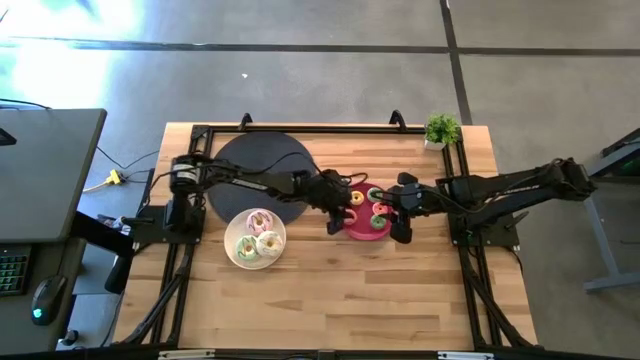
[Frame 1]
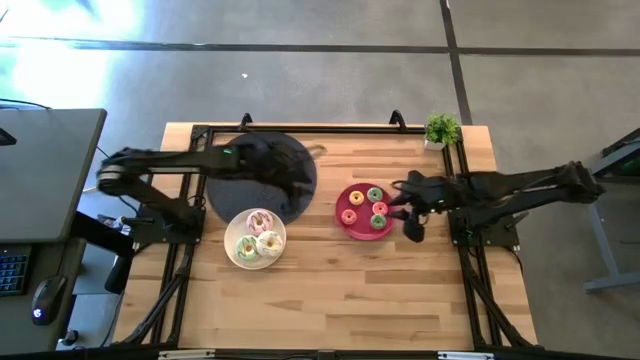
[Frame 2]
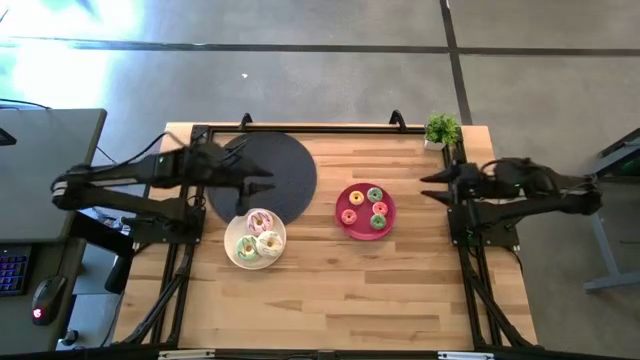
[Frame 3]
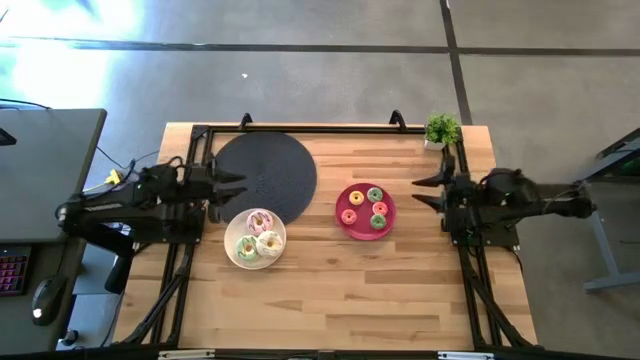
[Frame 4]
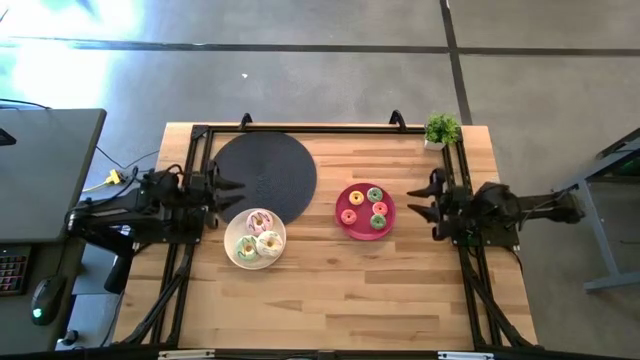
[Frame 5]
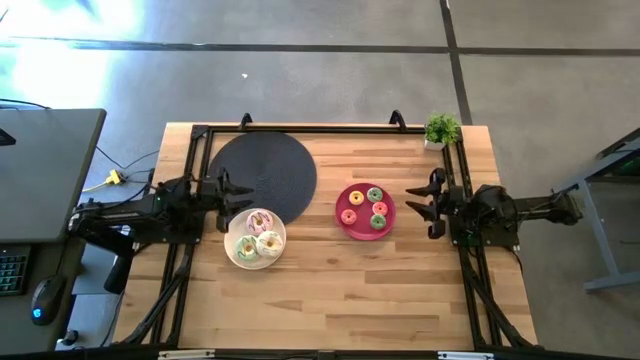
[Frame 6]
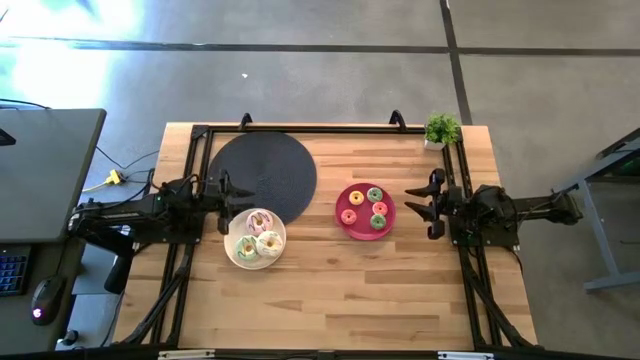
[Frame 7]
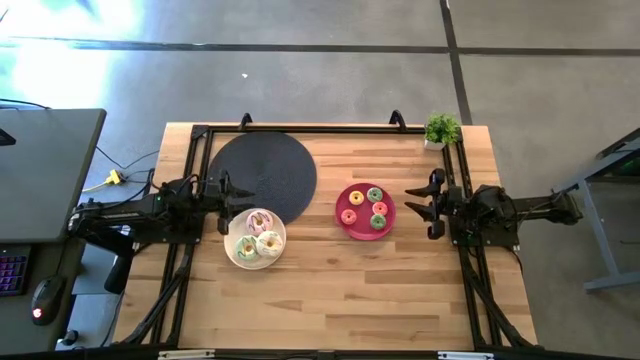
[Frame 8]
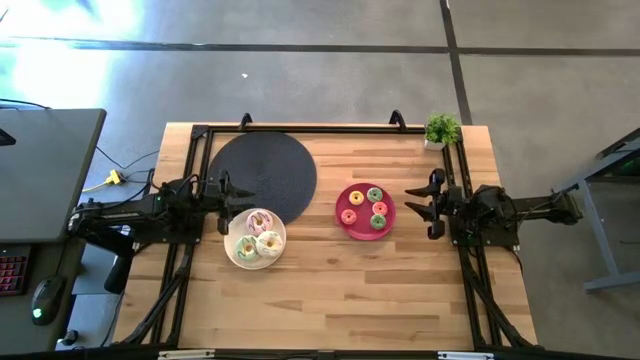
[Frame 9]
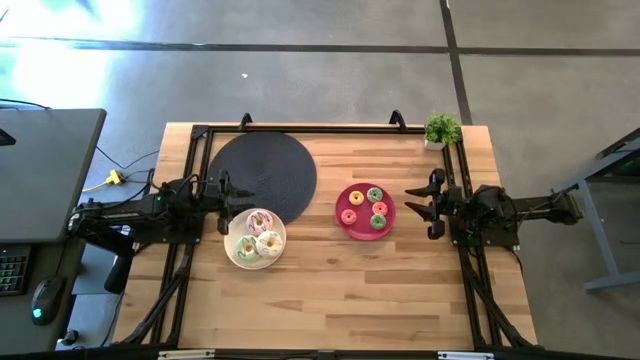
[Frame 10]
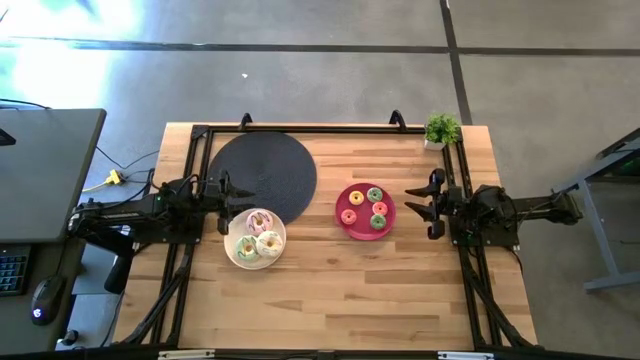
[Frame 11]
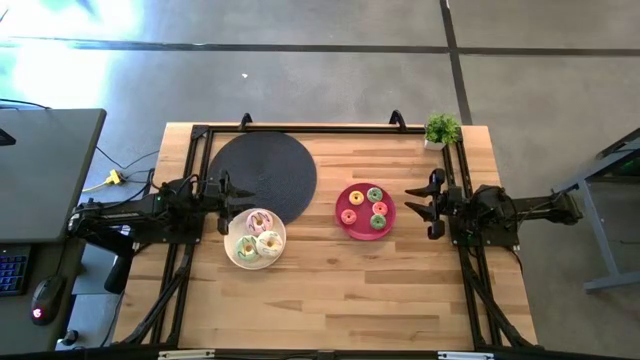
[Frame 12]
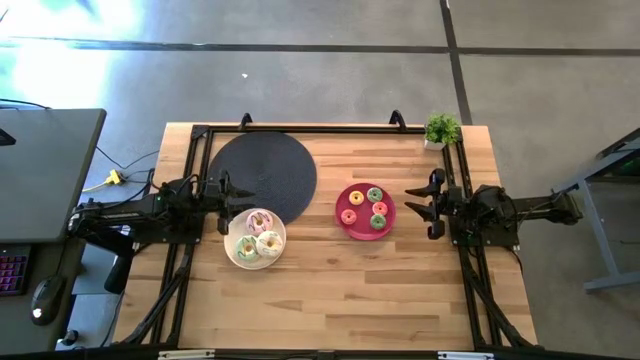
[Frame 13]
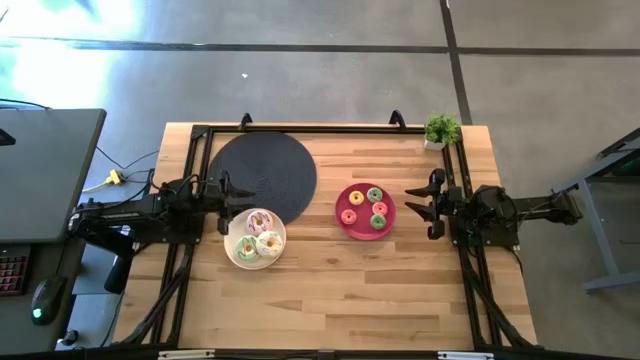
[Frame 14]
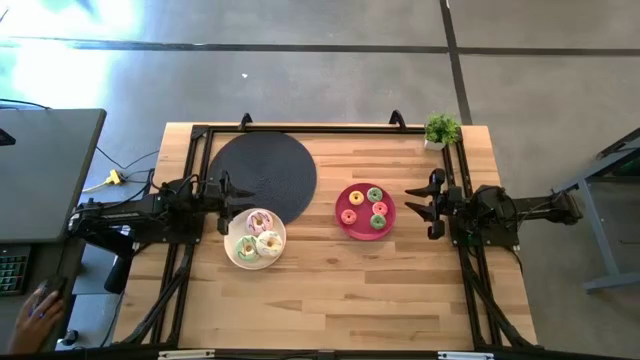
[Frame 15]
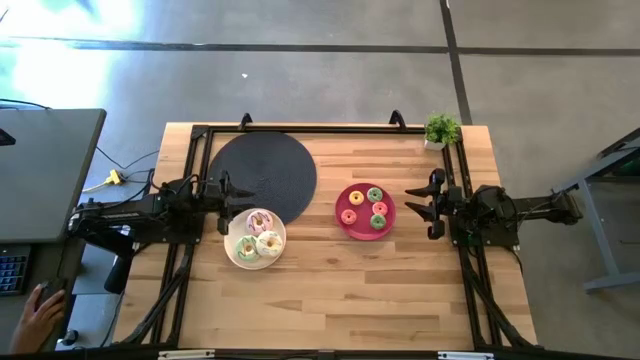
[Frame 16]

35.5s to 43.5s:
Task: Pick & Place donuts
Return to Home Position

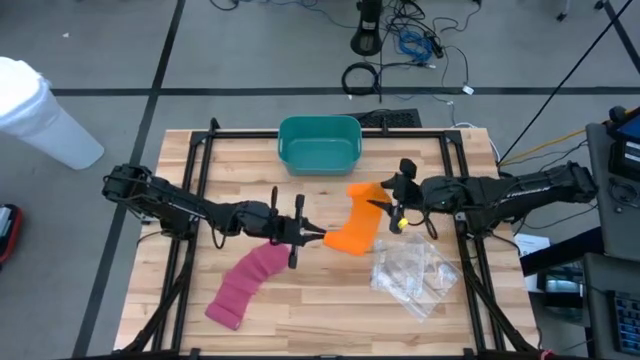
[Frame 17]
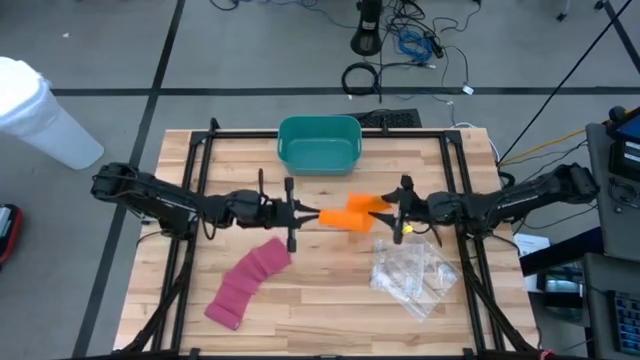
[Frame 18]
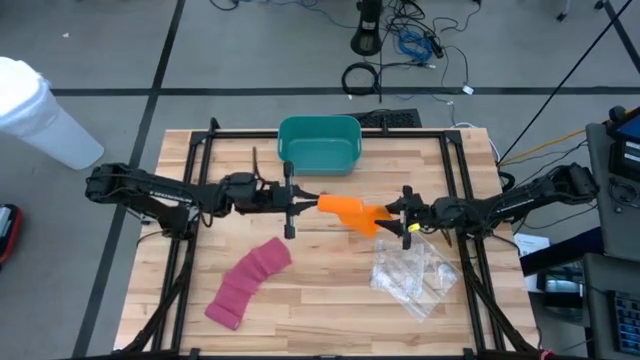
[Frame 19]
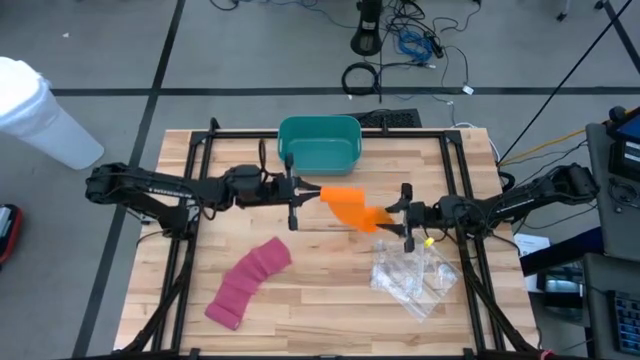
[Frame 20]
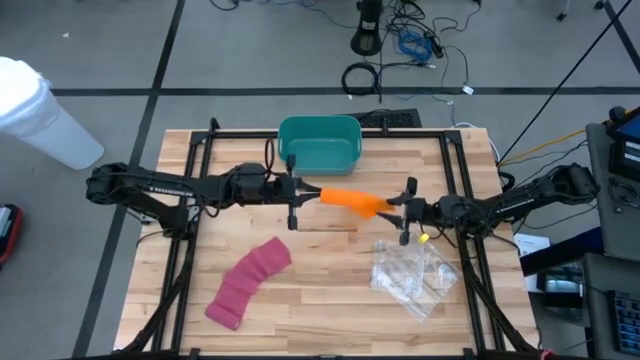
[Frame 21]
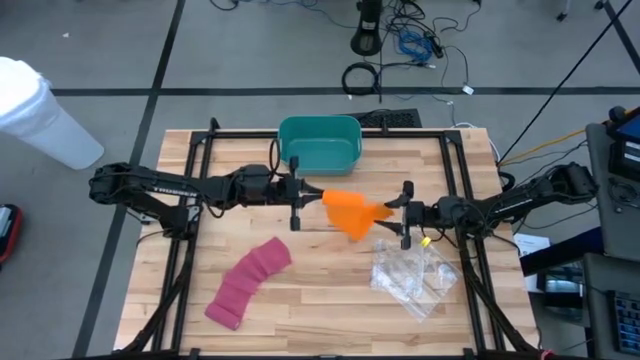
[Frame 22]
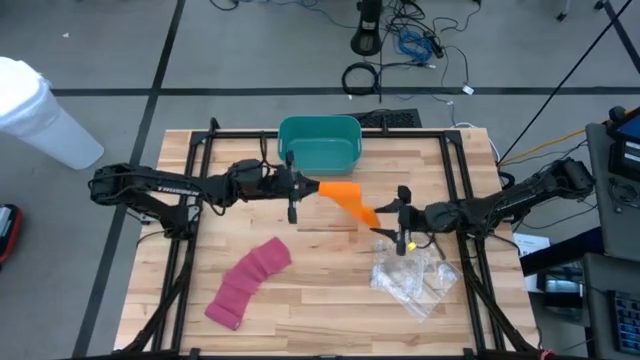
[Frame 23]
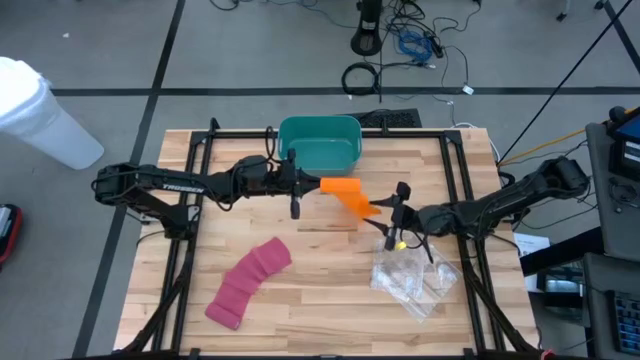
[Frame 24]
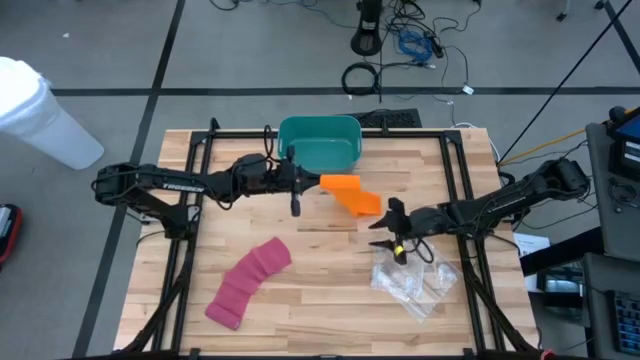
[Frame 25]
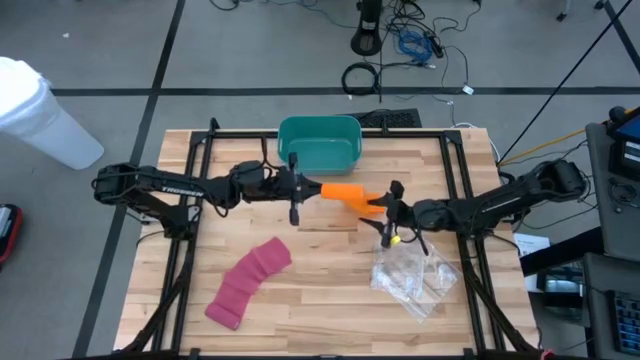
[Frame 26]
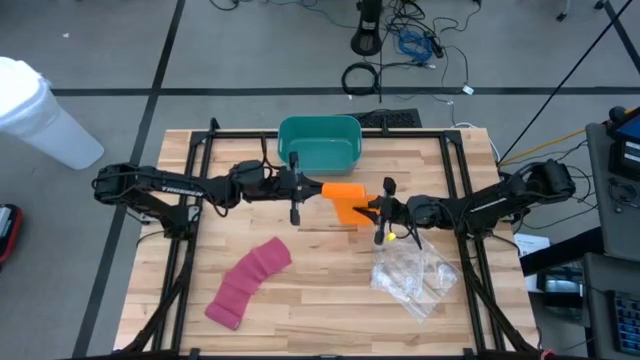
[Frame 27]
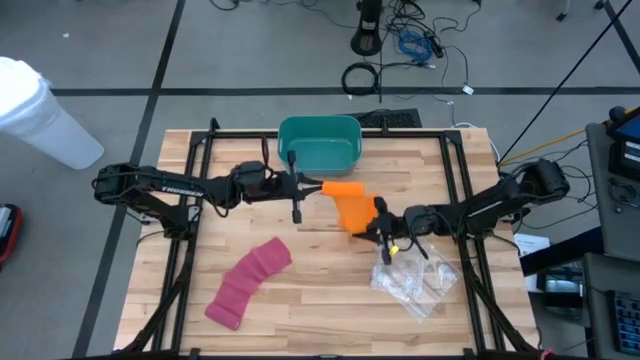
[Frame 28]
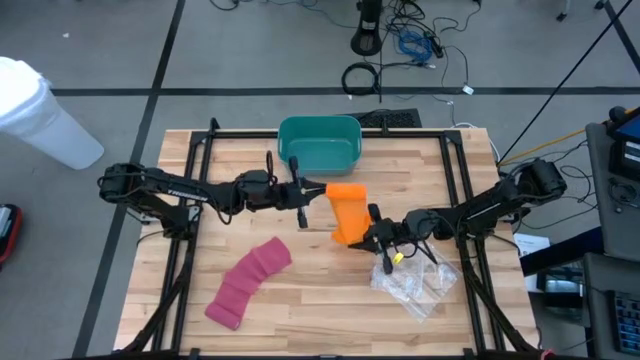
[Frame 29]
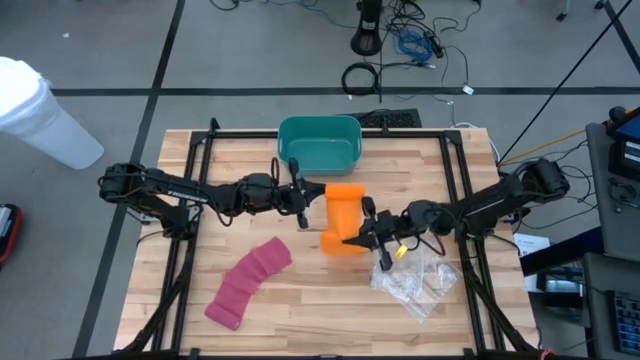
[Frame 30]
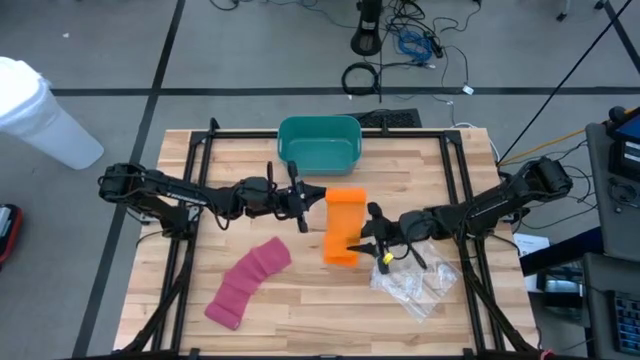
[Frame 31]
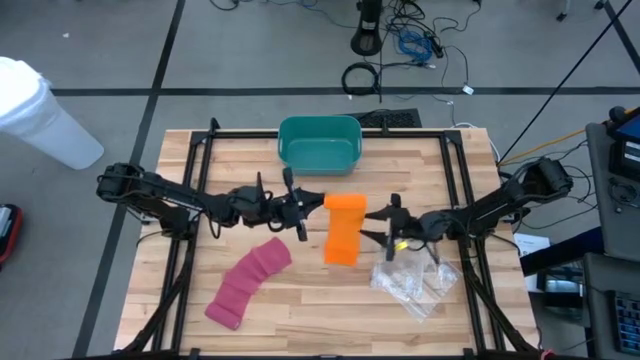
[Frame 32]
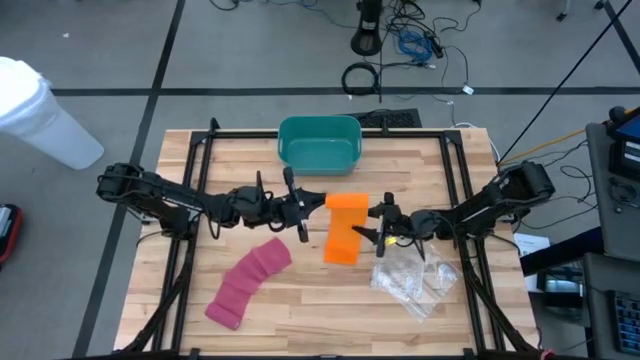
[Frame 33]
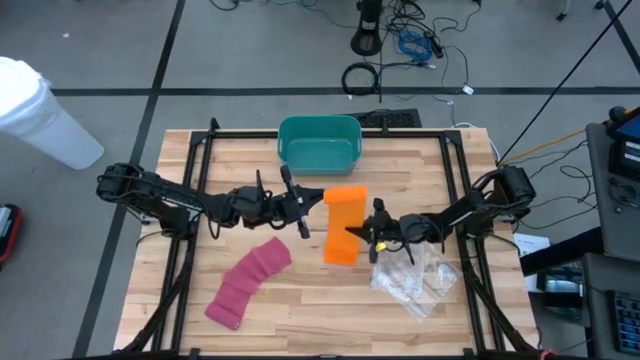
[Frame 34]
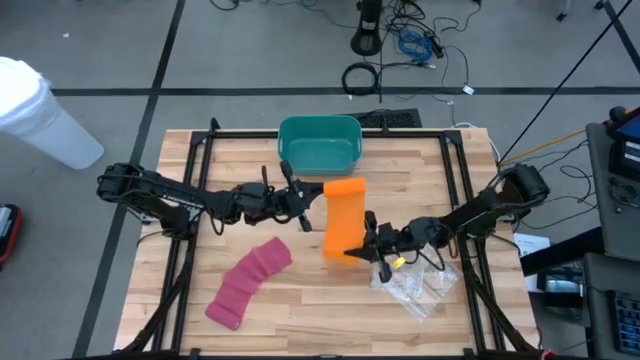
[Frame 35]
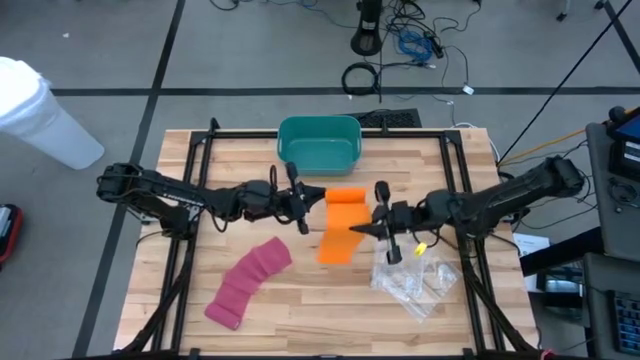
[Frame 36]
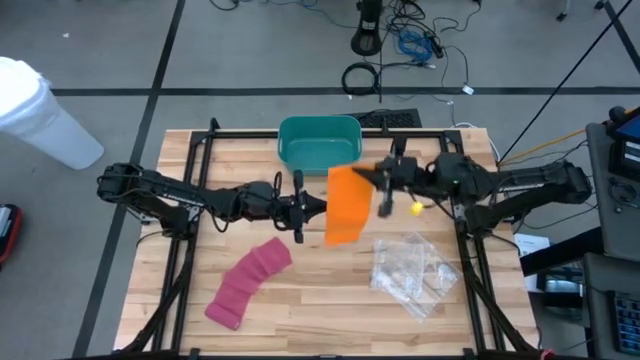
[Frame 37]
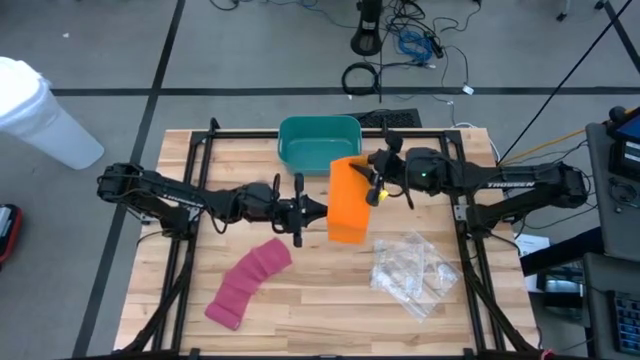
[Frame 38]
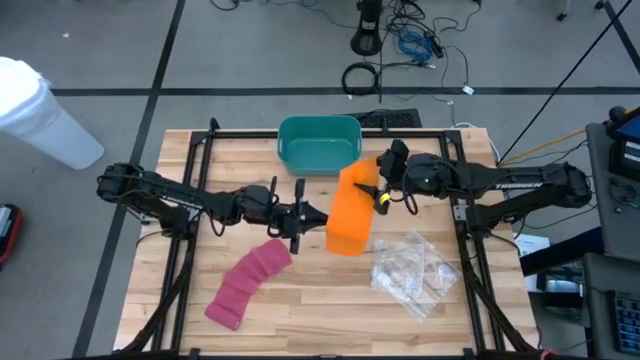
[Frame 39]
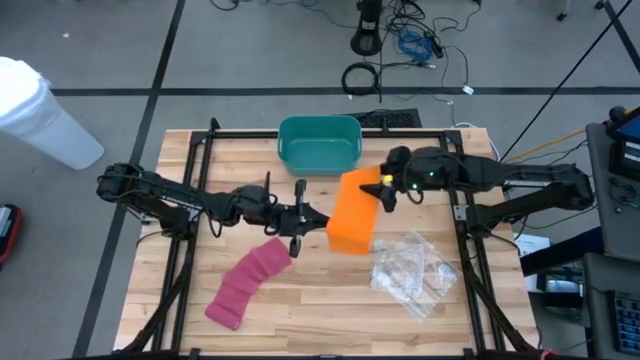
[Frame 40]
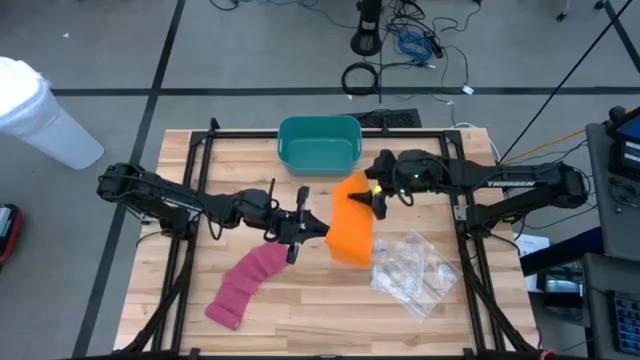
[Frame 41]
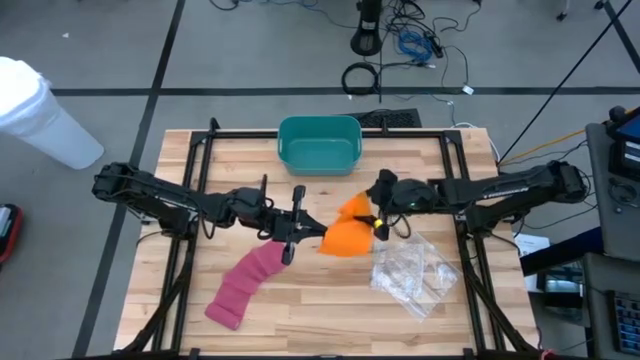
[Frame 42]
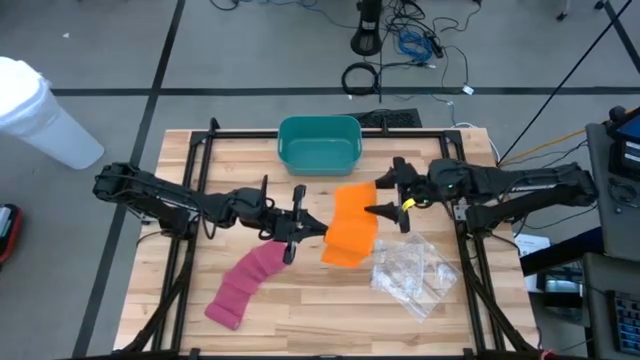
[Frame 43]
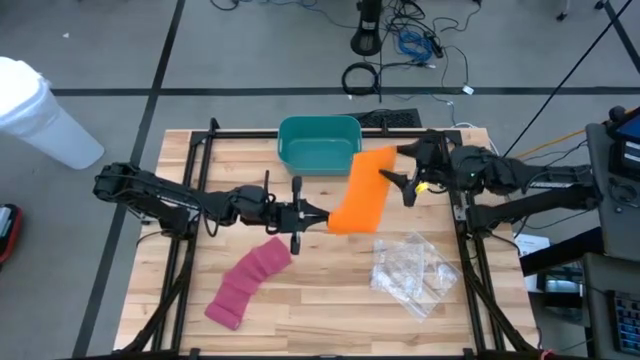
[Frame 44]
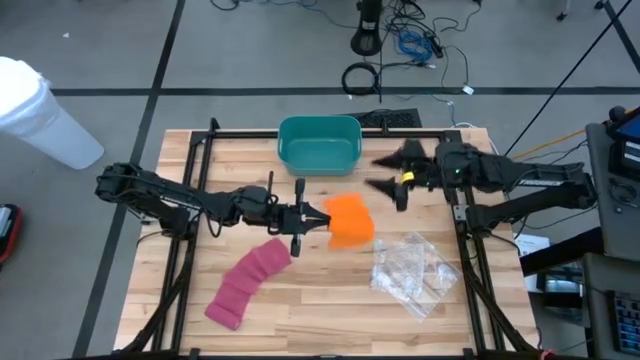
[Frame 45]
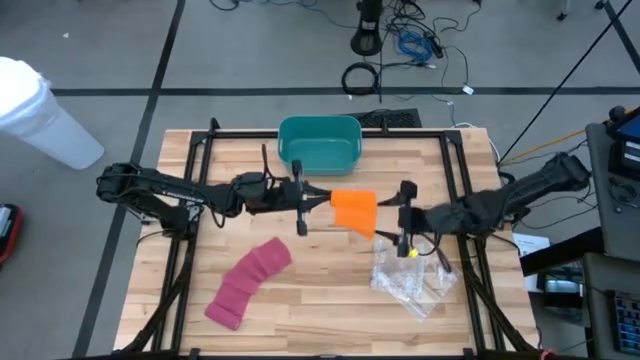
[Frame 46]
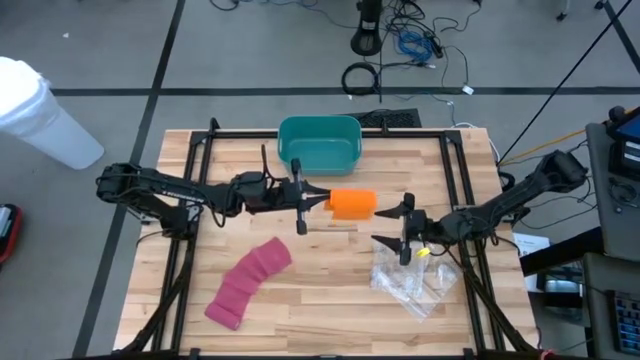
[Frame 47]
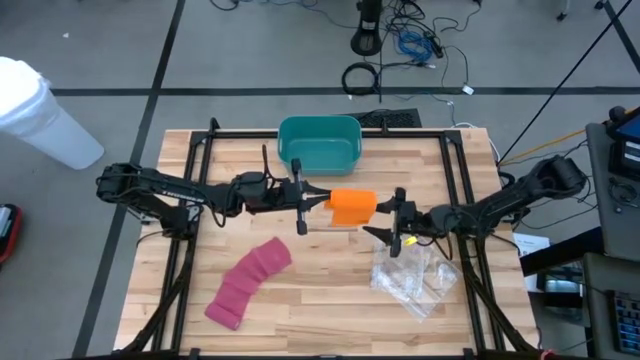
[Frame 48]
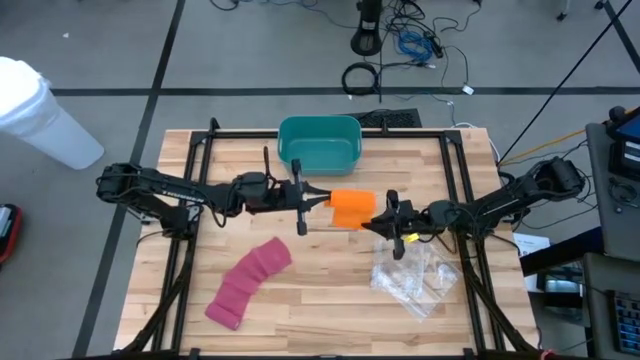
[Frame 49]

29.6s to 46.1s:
Task: Roll bandage
Roll the orange bandage
